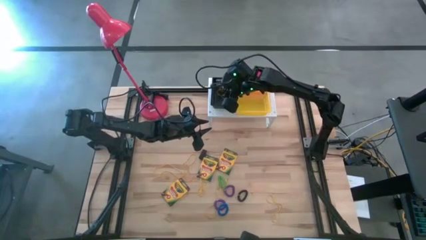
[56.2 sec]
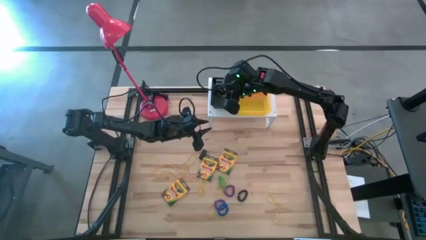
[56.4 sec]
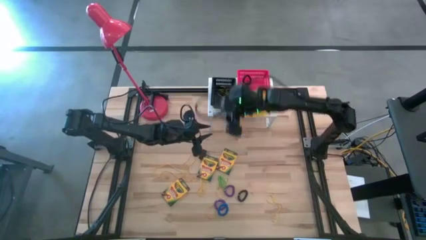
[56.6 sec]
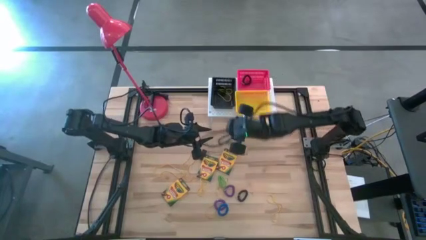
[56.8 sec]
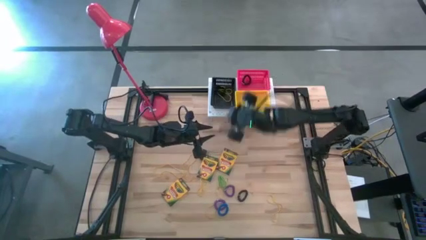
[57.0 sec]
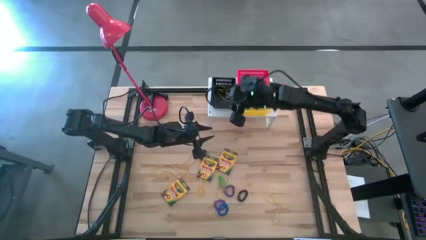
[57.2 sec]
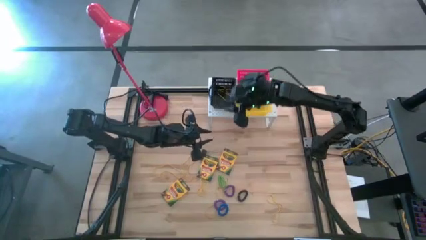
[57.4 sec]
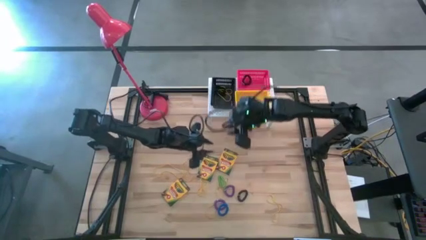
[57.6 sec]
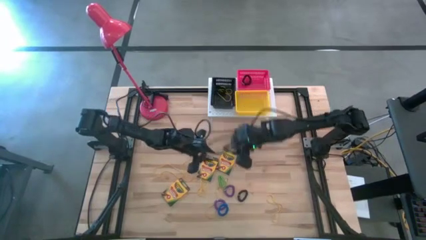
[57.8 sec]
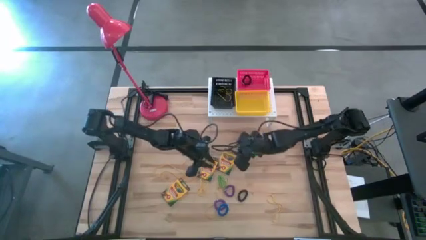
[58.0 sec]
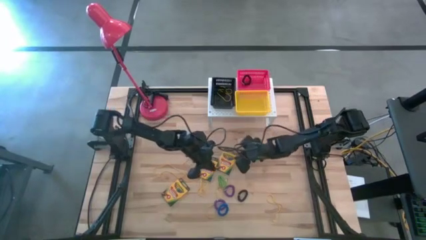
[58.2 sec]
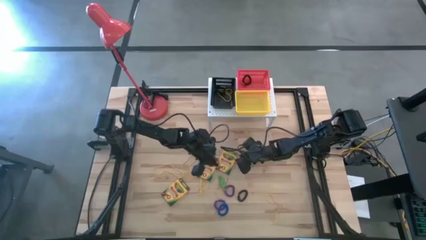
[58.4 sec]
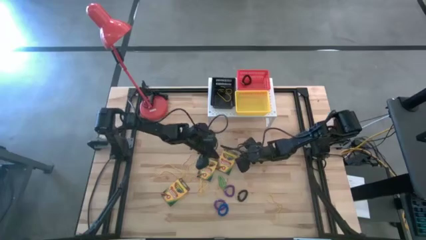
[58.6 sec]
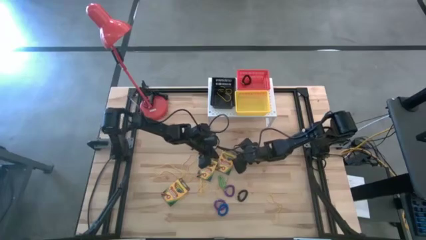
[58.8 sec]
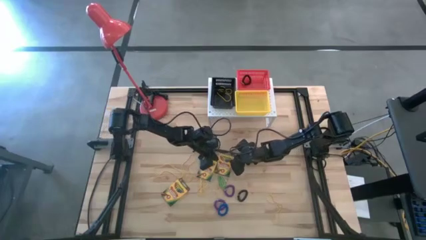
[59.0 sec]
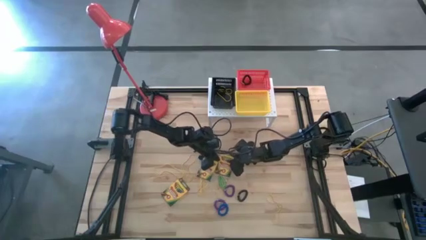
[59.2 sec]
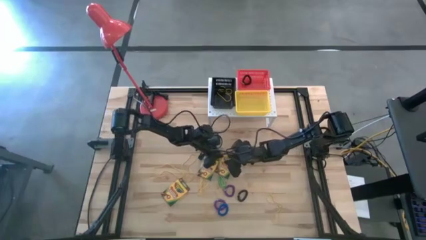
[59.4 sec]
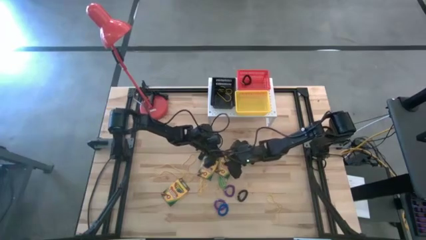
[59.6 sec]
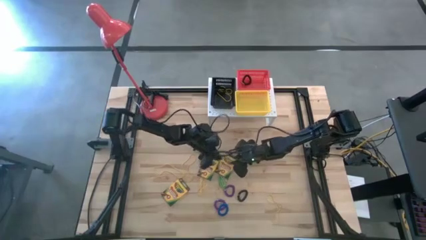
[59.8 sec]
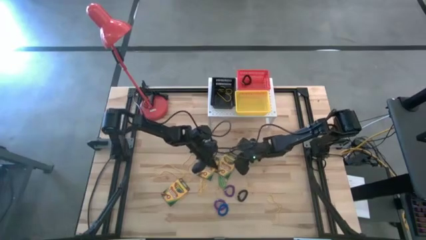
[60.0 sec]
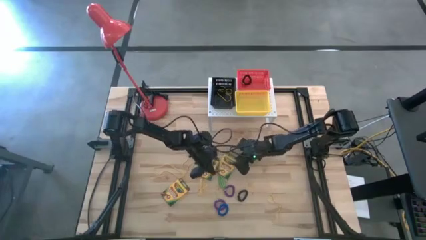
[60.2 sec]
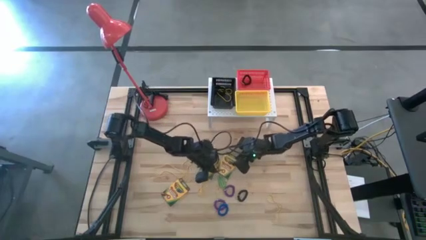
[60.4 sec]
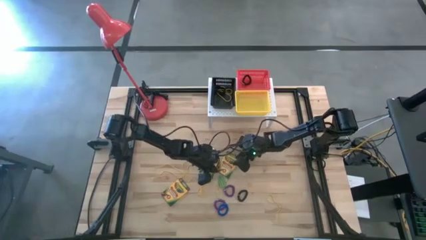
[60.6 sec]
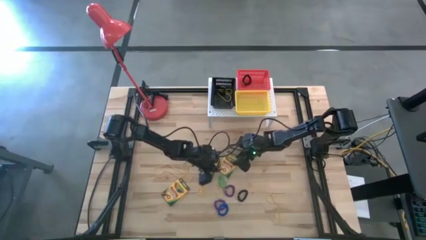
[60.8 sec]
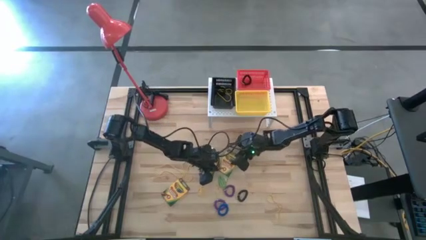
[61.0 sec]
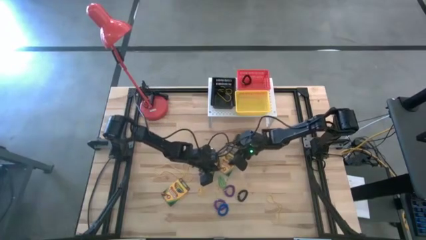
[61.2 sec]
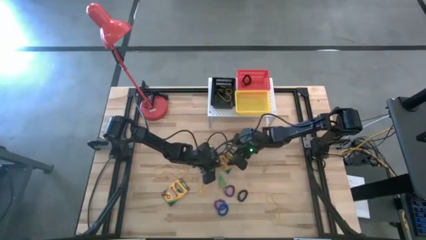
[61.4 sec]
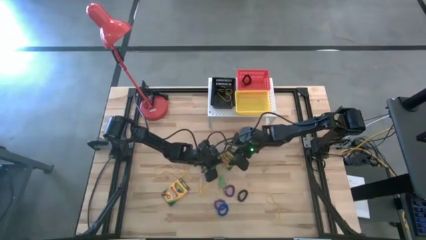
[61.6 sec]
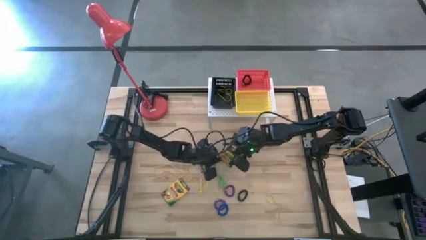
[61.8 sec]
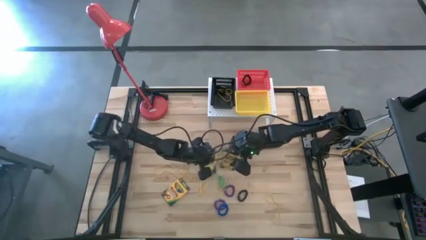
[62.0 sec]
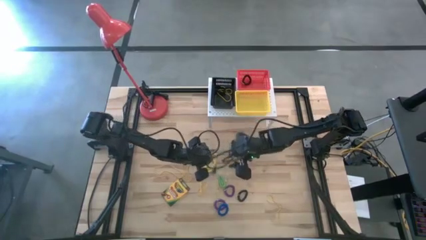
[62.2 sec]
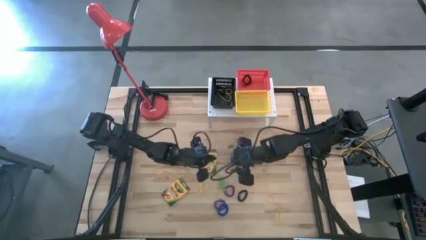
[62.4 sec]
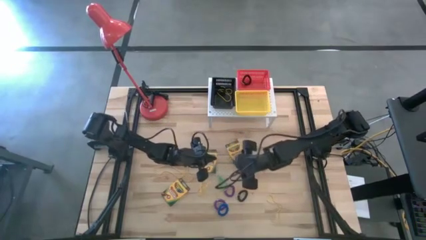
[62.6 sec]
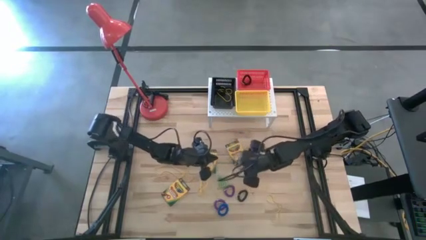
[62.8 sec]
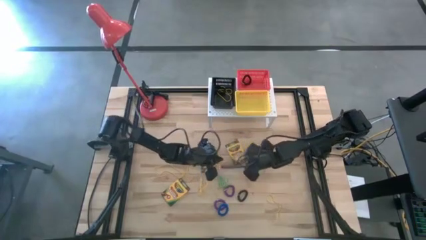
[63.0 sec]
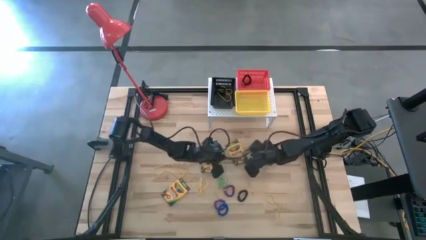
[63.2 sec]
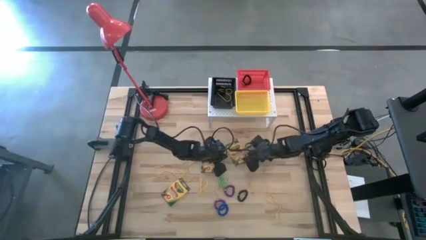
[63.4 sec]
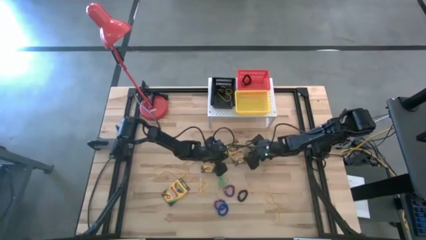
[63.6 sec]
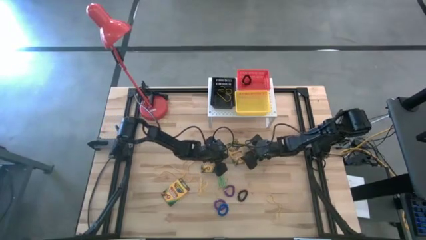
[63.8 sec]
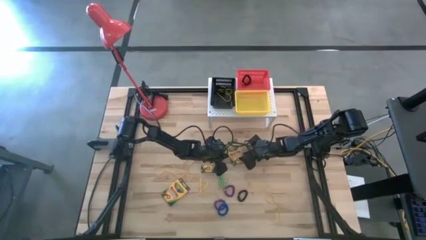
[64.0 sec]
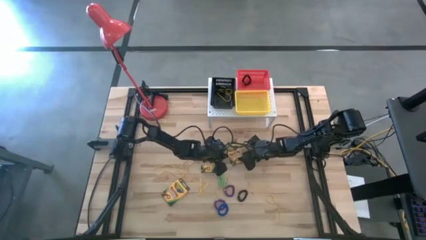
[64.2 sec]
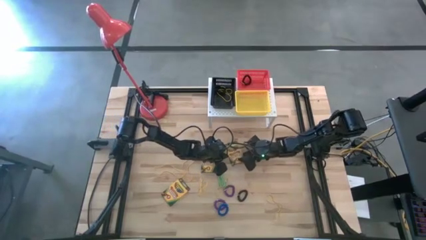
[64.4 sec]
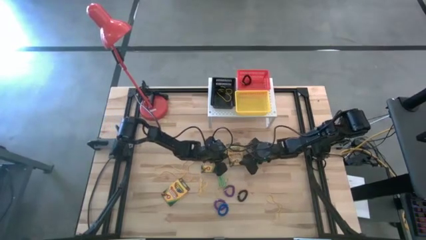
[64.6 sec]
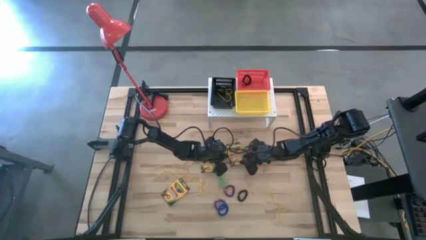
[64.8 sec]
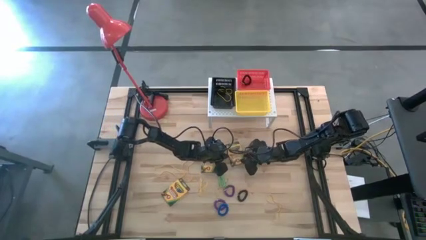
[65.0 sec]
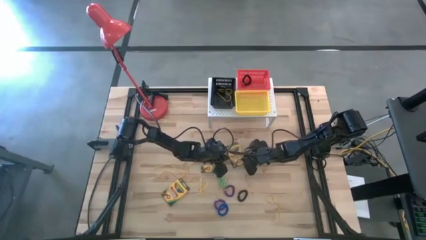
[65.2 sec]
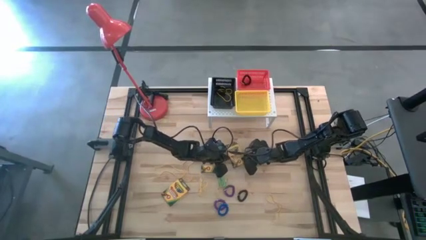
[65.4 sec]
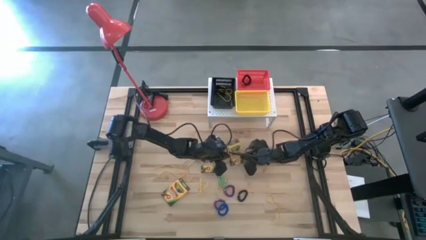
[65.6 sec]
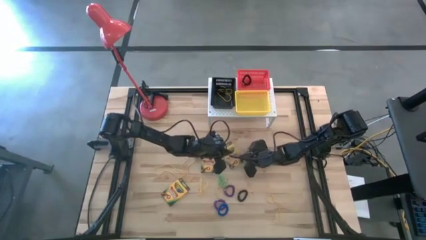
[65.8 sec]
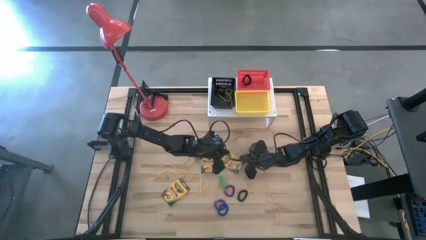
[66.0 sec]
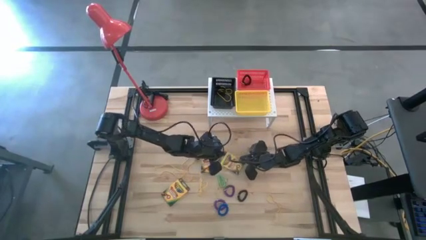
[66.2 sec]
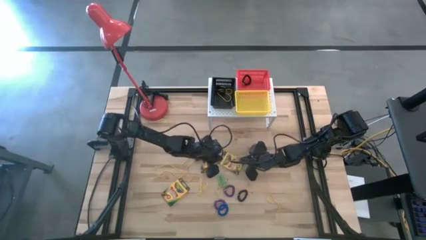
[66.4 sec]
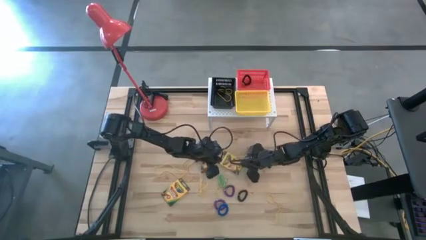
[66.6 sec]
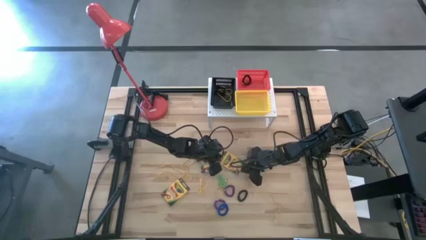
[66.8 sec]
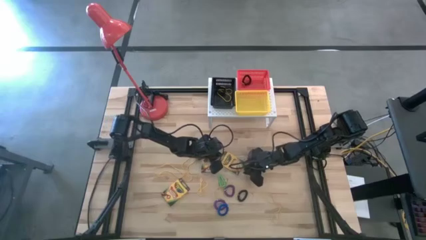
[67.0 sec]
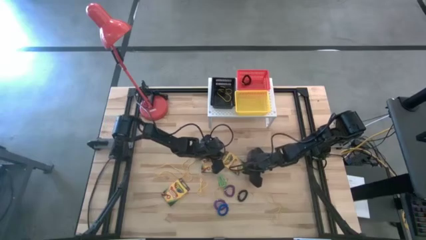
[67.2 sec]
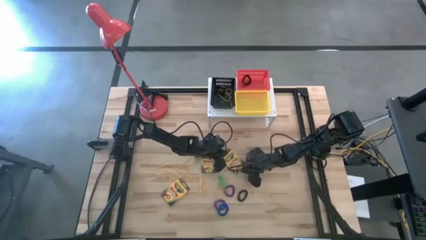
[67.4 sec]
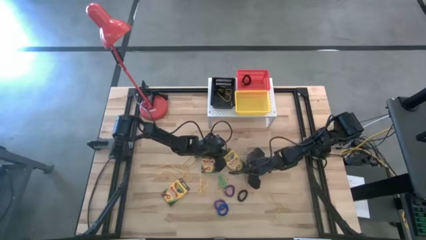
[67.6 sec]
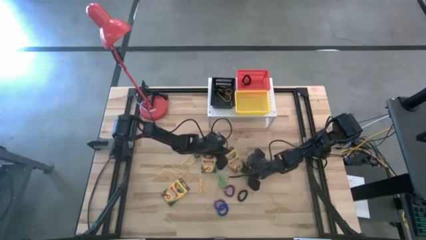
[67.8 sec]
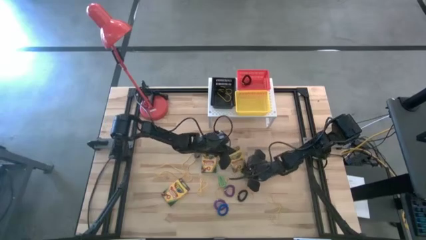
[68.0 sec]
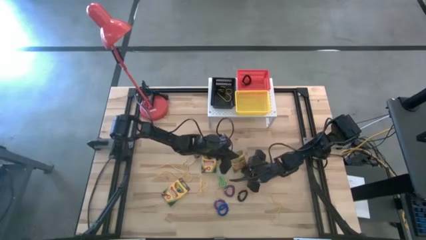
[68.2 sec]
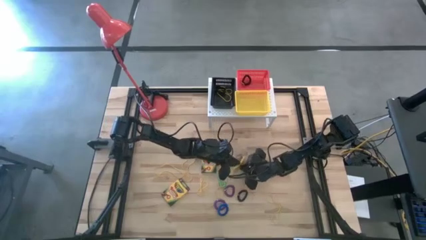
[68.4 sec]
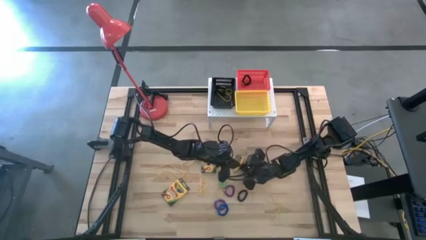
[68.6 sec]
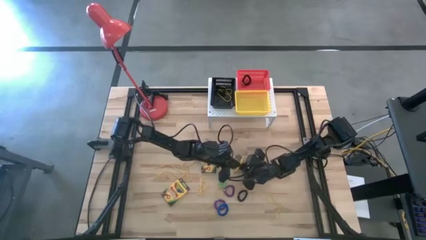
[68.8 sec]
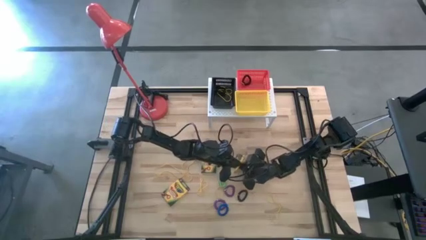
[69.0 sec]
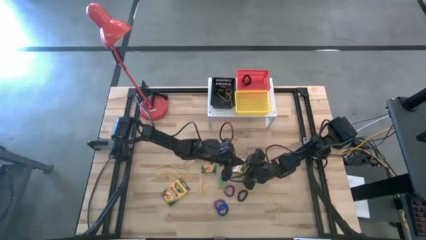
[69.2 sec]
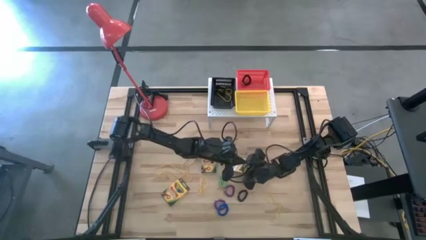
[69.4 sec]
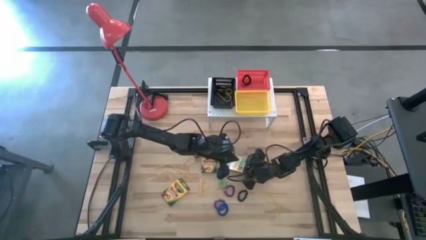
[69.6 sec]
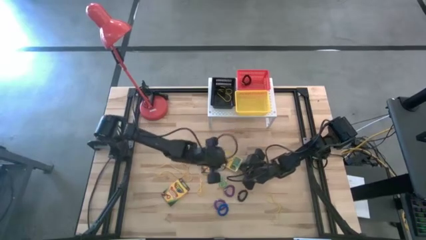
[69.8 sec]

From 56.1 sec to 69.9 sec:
Task: Pick & Place Office Desk Supplies
Put the yellow crayon box into the yellow bin on the shelf
